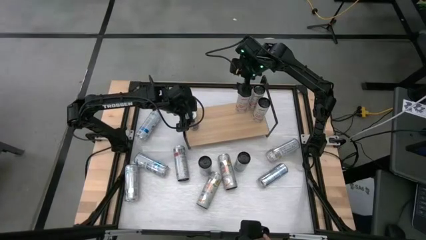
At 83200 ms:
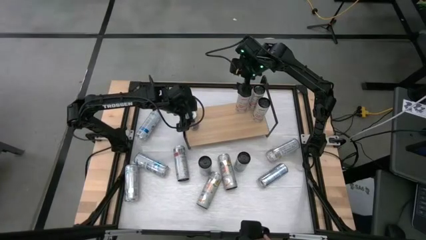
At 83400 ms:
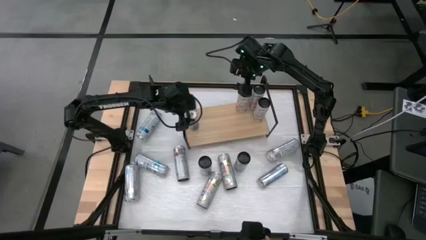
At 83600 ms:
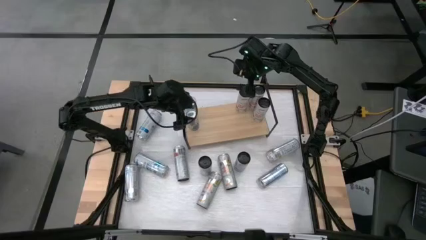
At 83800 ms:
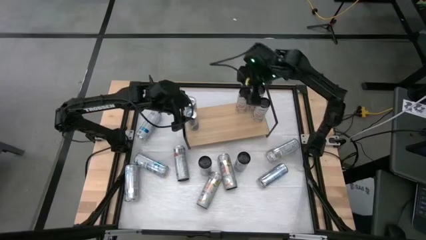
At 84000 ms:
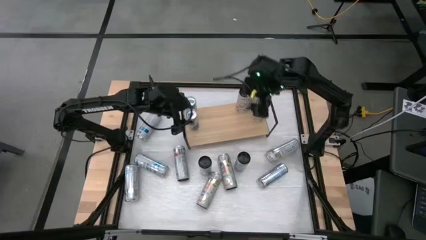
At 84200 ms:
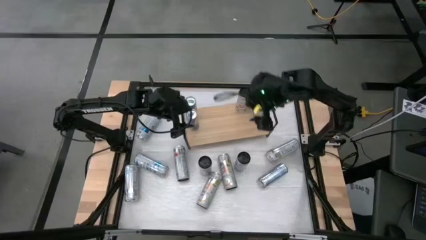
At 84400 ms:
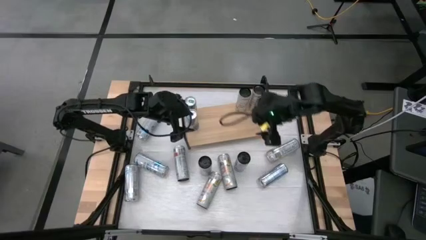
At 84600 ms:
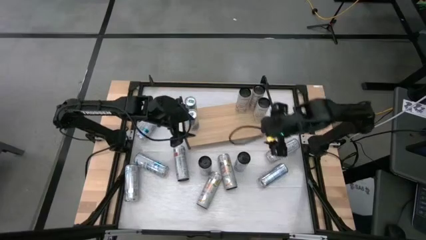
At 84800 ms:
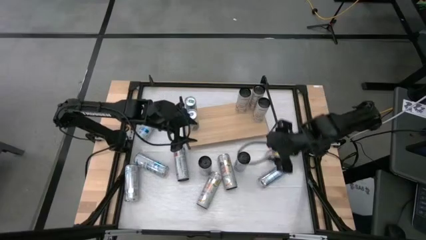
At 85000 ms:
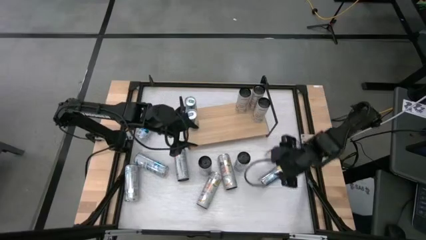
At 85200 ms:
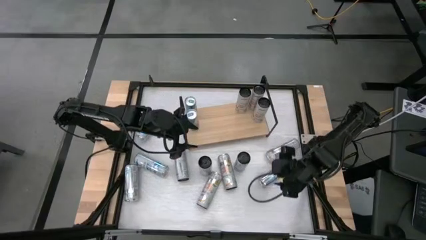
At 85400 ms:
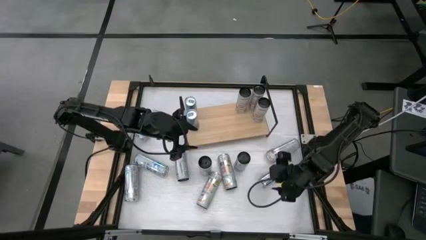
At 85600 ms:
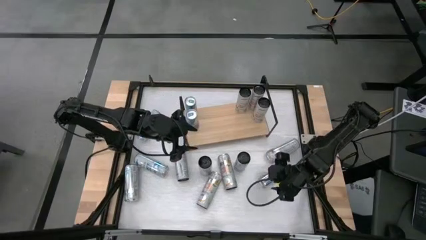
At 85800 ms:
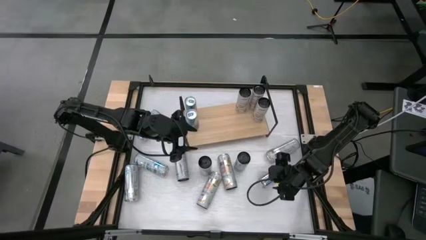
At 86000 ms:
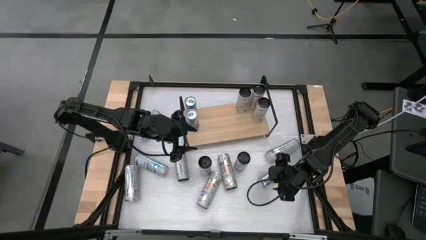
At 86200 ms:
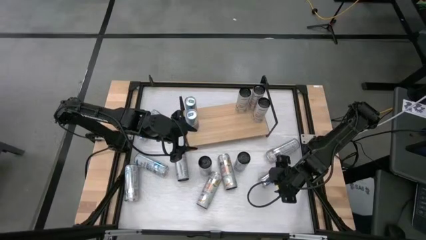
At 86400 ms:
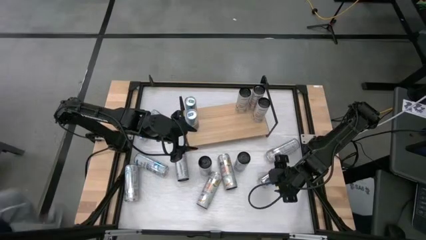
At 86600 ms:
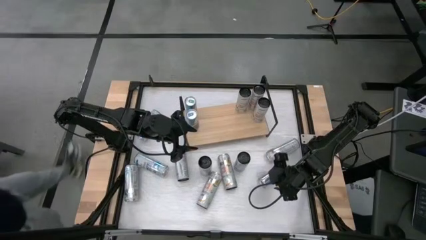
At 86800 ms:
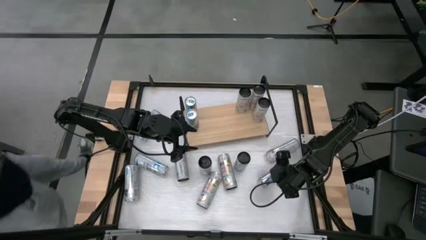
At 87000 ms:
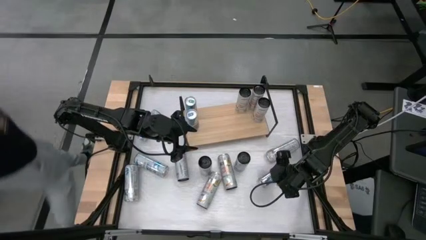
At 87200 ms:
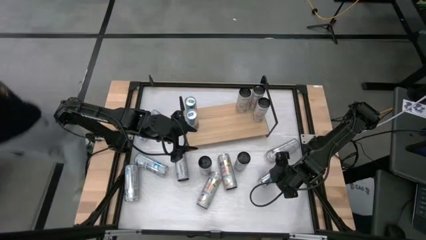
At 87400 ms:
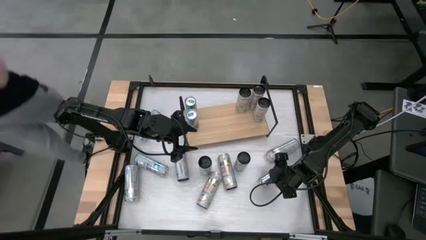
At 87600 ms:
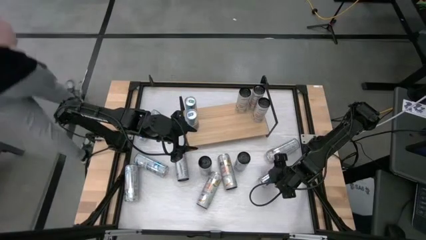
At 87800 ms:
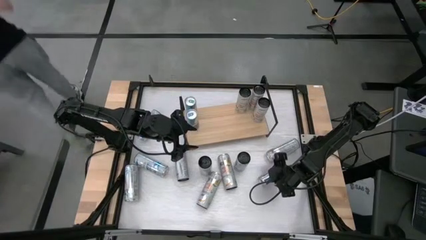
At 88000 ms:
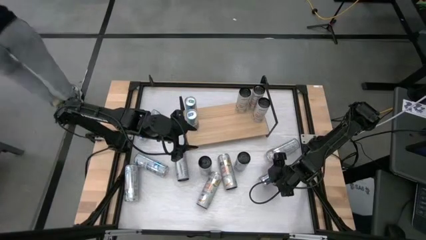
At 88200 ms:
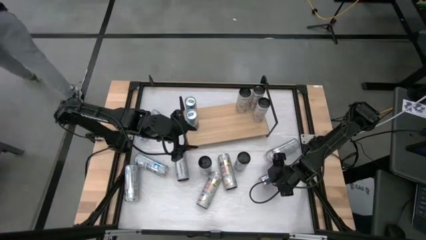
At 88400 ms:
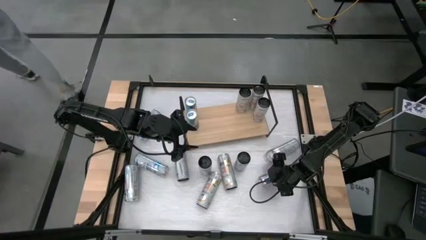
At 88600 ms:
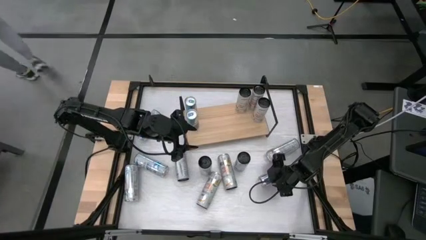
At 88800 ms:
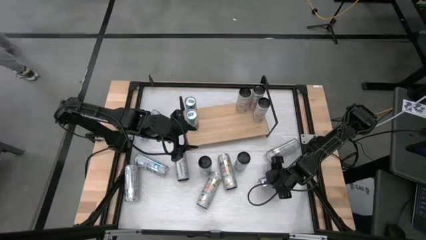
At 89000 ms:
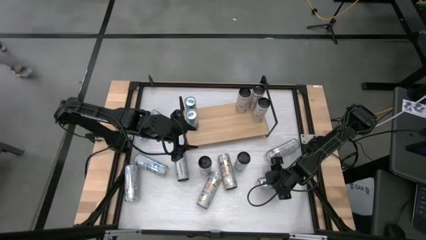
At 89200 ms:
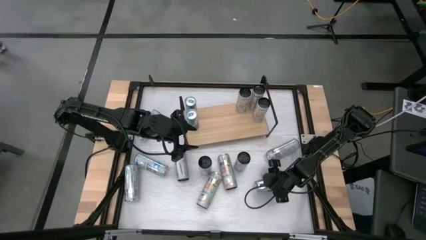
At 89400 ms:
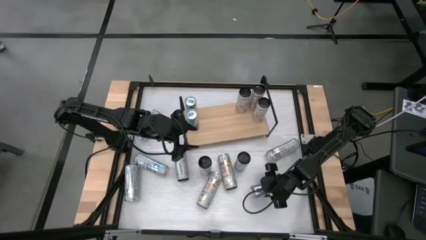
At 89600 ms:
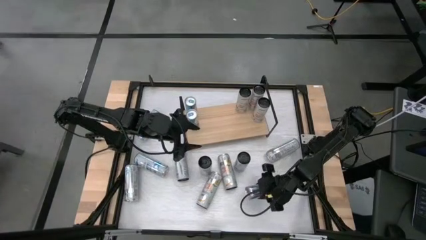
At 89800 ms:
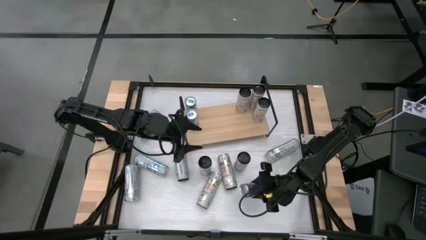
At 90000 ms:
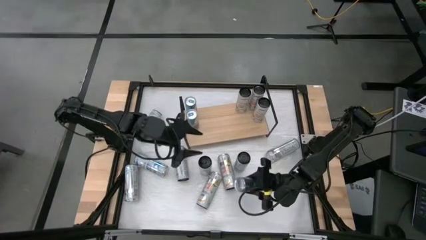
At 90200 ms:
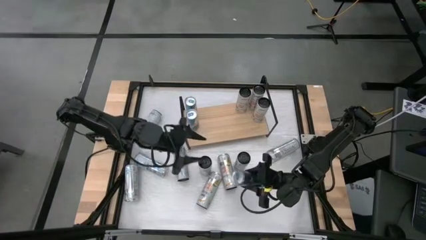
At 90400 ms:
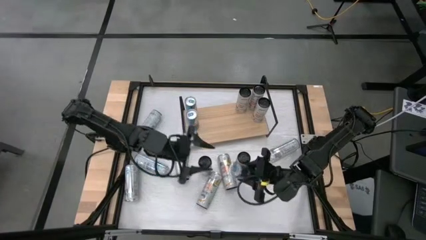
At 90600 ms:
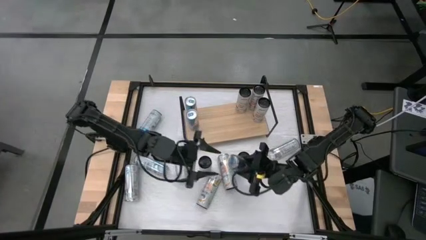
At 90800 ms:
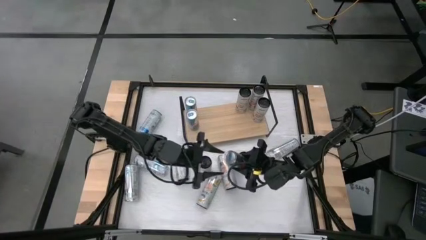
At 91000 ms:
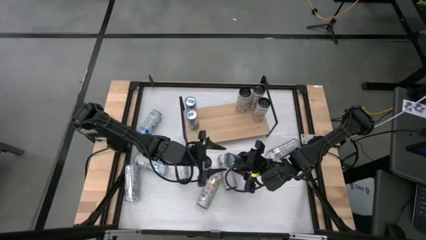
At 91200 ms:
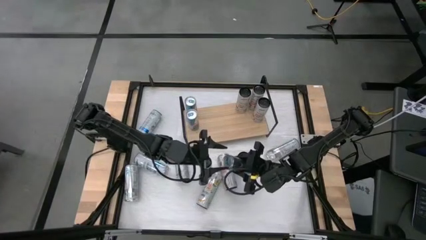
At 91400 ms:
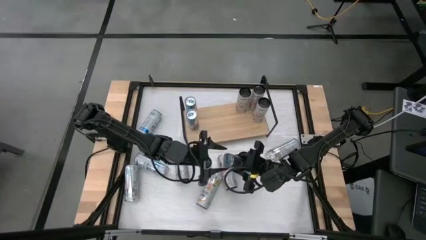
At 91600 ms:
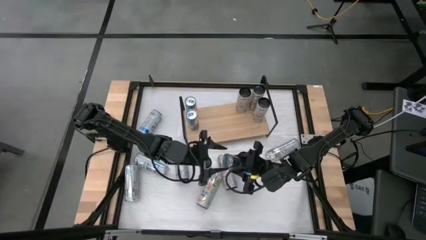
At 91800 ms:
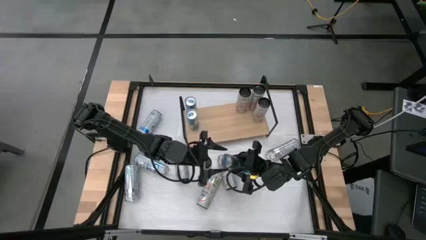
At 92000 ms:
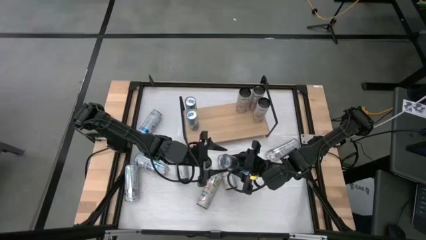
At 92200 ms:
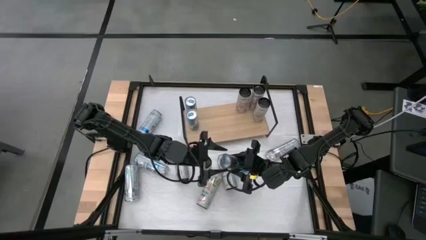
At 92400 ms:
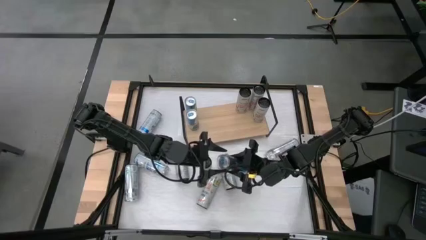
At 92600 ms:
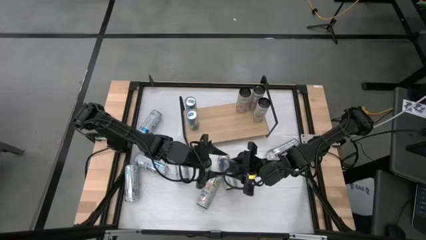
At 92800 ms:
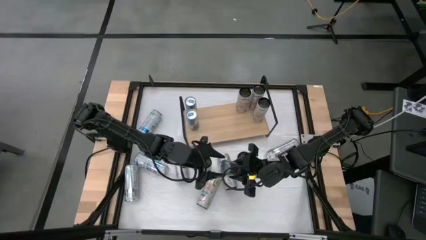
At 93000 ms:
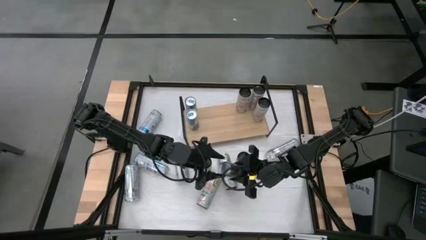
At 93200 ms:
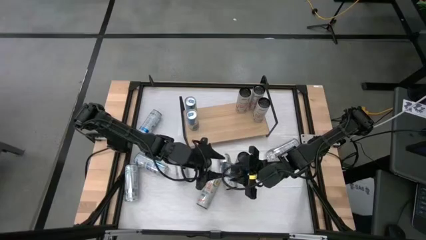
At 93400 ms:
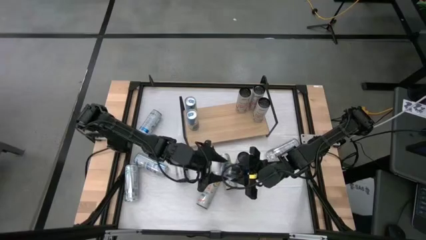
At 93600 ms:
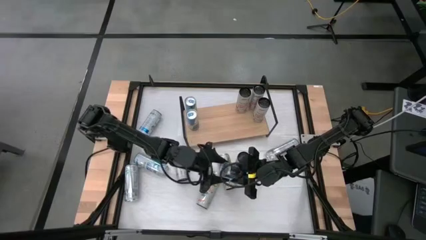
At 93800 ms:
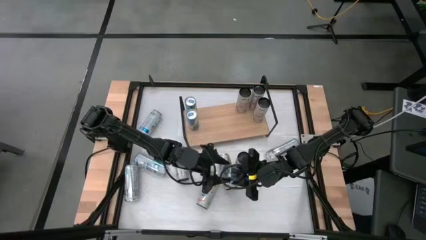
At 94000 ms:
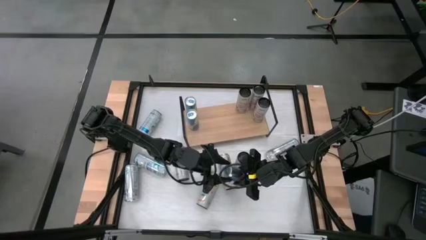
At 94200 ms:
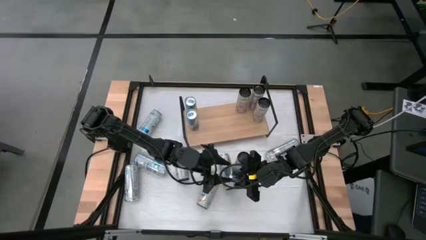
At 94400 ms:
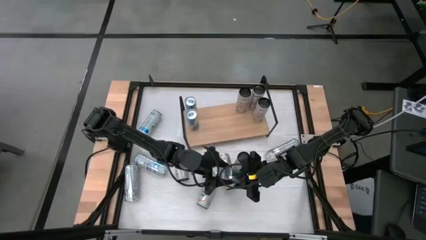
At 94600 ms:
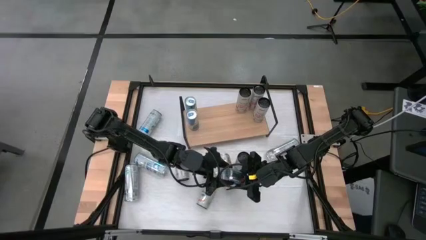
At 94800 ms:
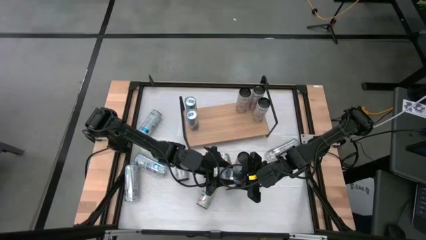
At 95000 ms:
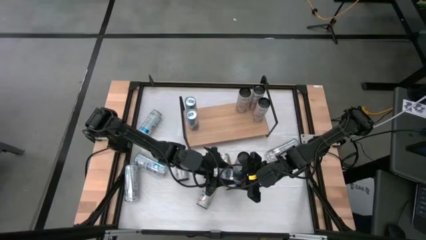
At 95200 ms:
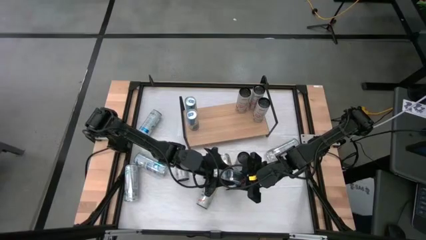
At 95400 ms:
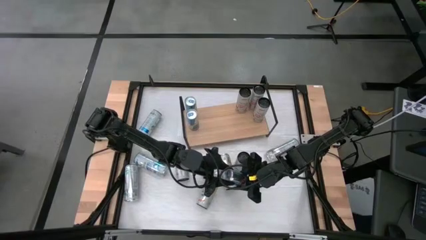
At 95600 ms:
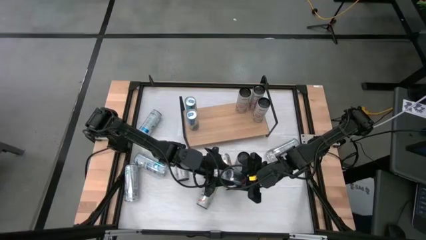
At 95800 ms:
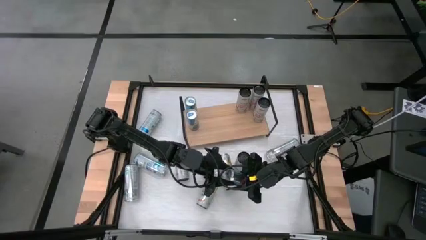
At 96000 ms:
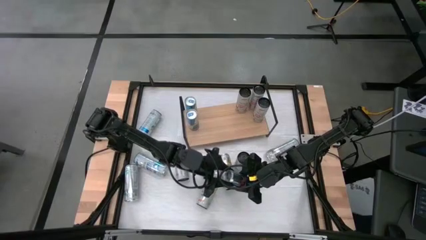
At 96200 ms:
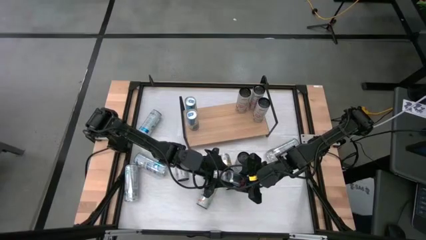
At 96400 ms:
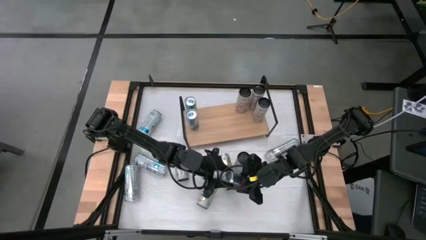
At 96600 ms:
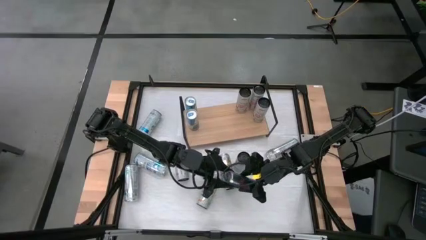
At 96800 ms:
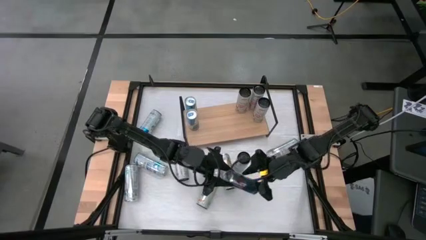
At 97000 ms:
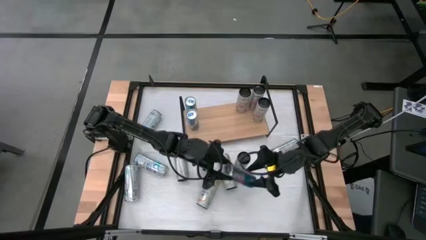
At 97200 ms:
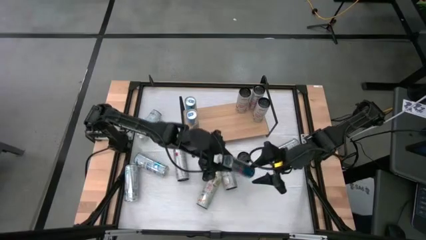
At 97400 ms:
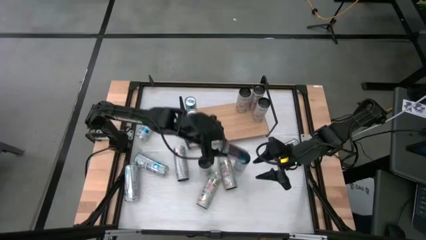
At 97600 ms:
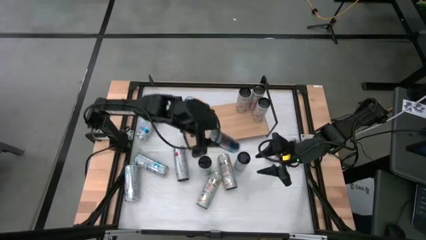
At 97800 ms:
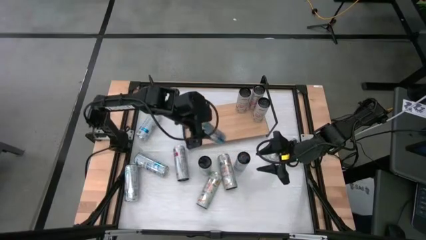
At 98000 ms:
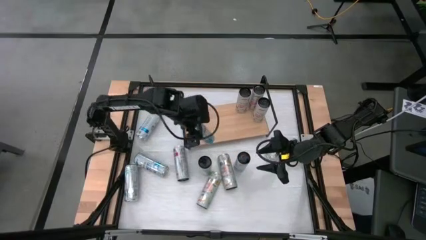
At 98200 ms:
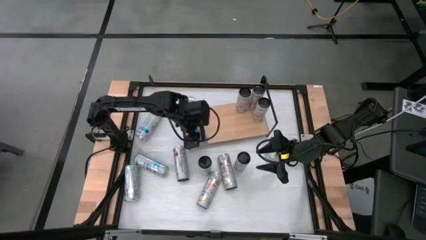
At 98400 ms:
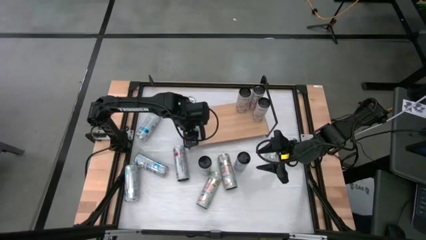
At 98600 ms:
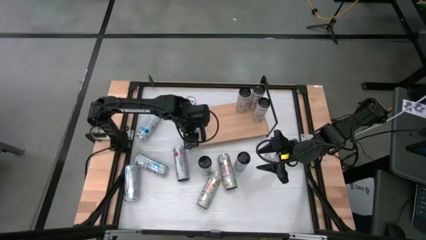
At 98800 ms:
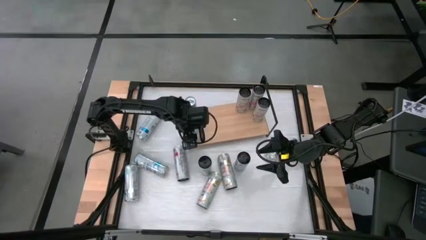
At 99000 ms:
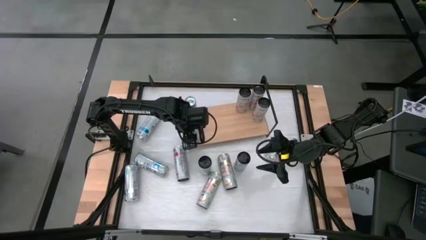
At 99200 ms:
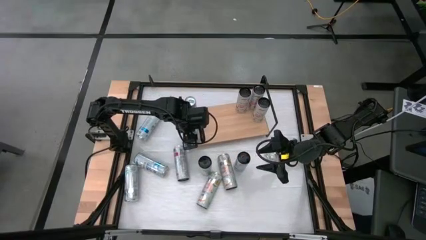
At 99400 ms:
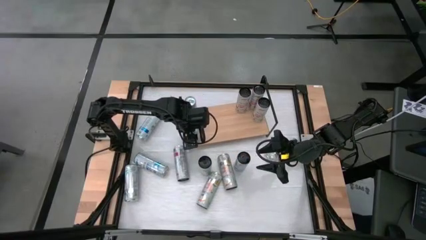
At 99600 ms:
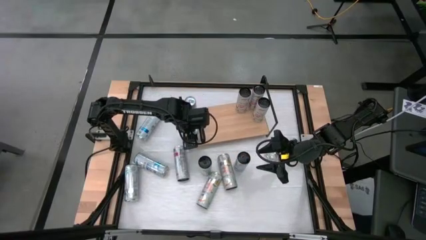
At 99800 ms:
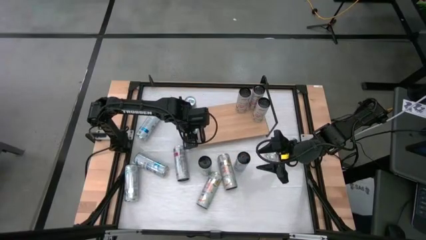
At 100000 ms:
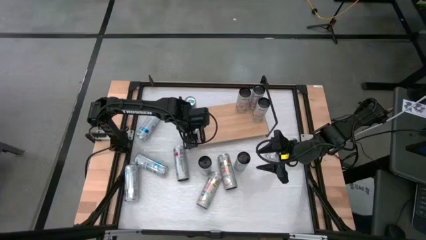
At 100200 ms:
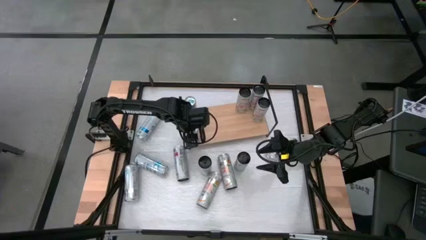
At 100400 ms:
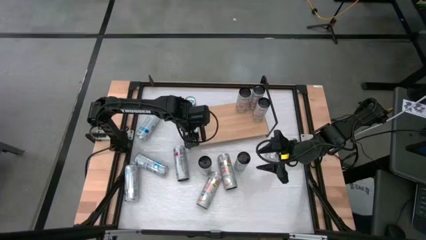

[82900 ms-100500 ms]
Task: Place canned beverage on shelf
Put the blue soda can on the shelf aligned with the other blue soda can
